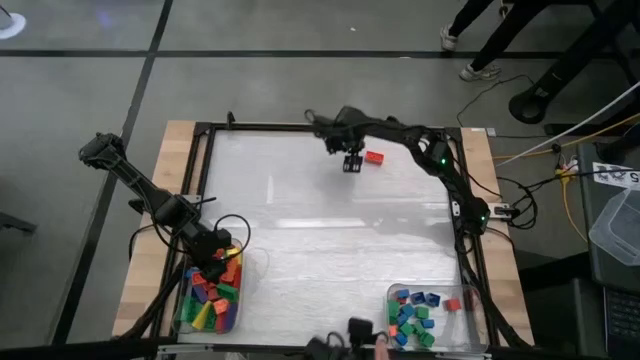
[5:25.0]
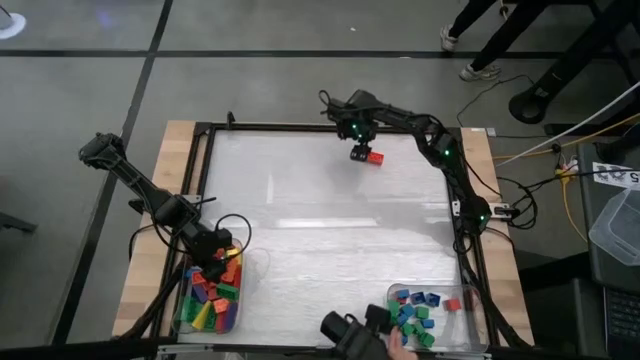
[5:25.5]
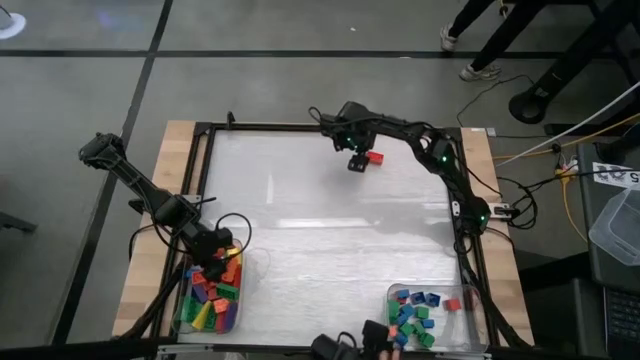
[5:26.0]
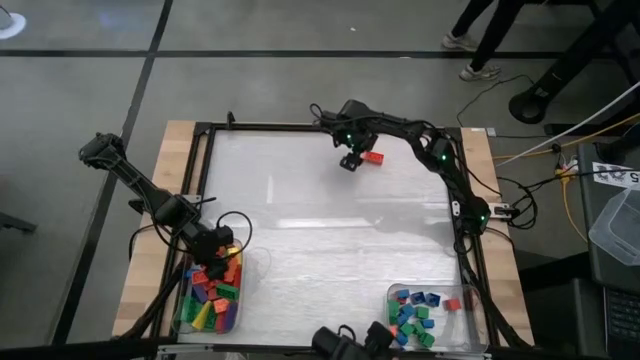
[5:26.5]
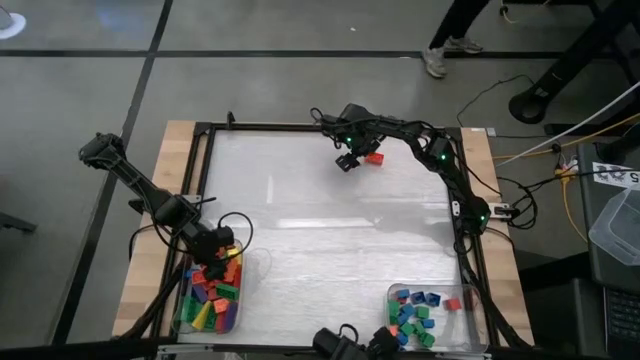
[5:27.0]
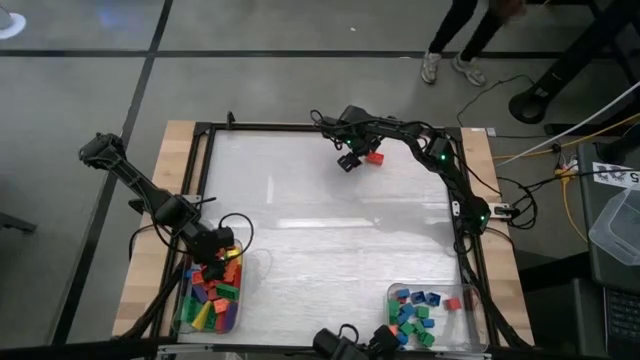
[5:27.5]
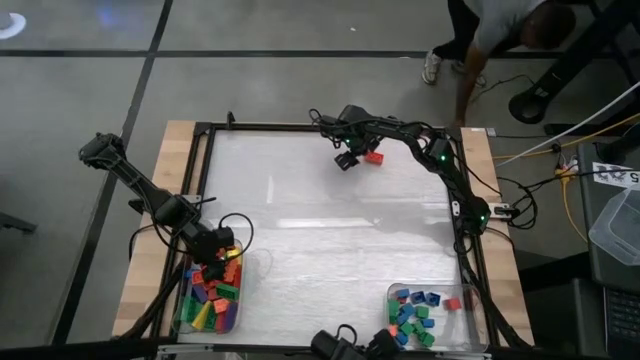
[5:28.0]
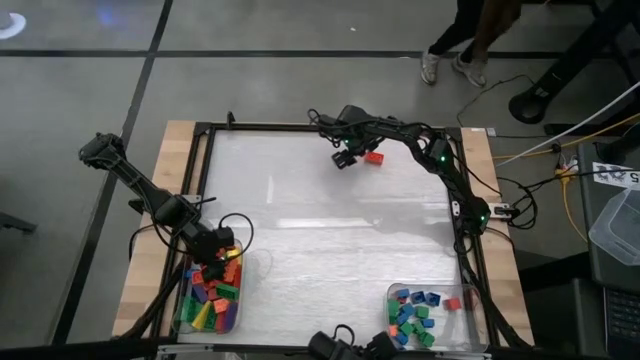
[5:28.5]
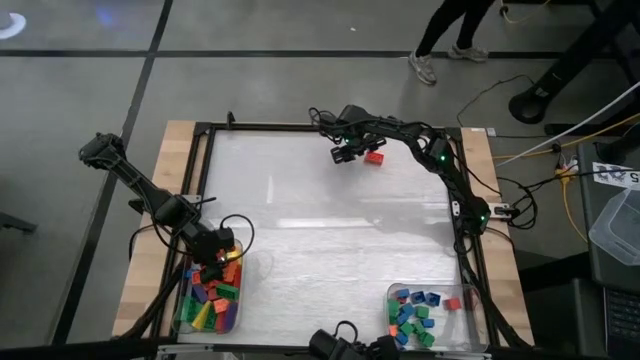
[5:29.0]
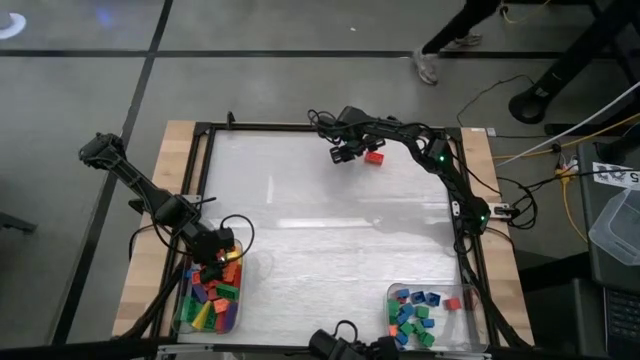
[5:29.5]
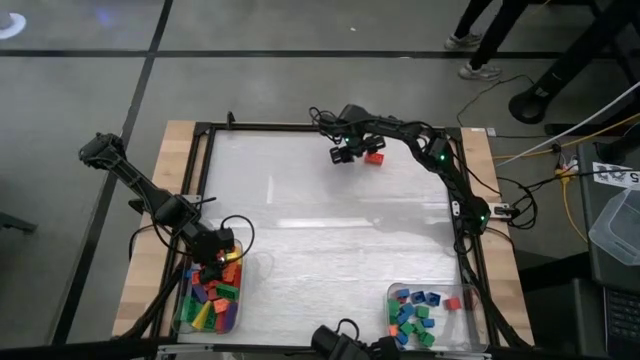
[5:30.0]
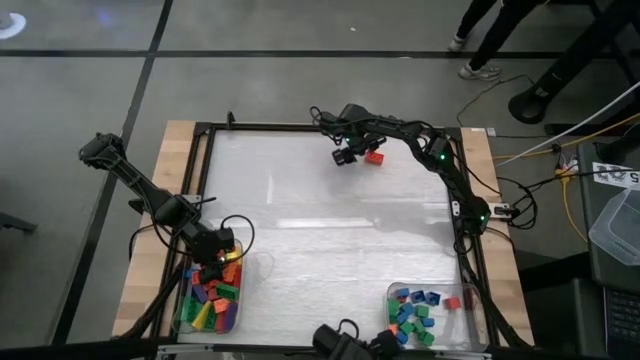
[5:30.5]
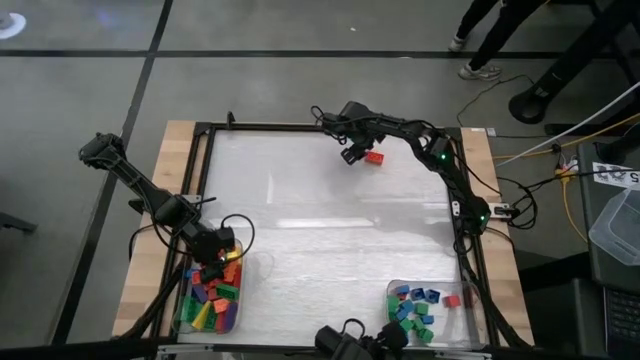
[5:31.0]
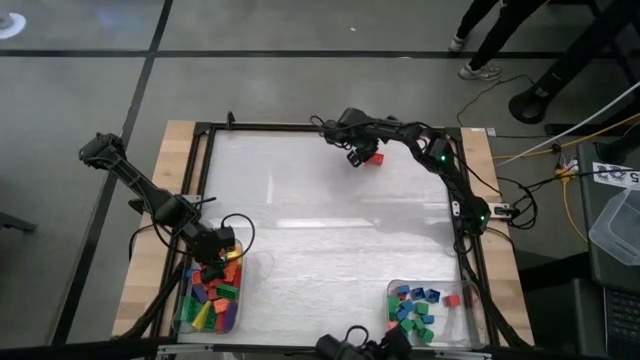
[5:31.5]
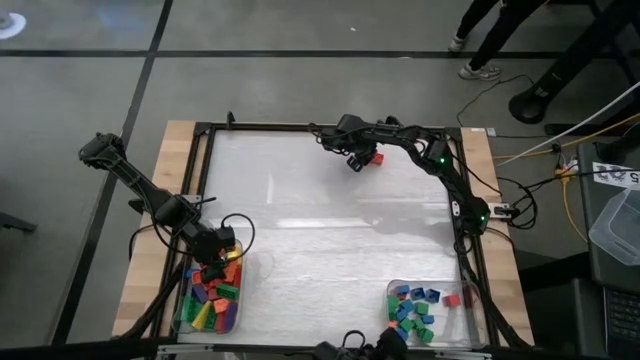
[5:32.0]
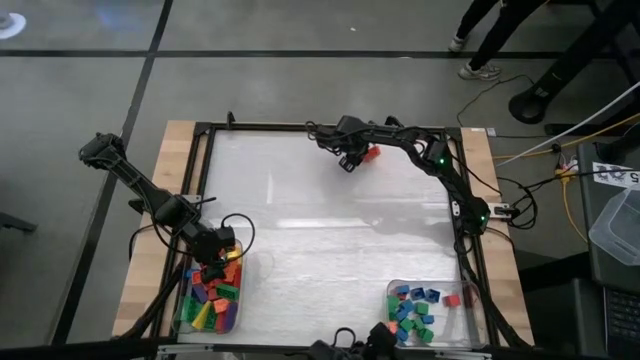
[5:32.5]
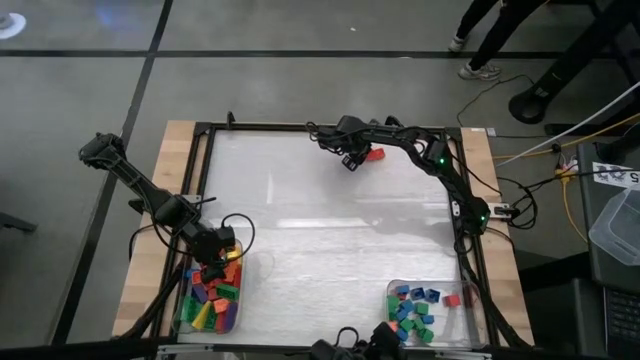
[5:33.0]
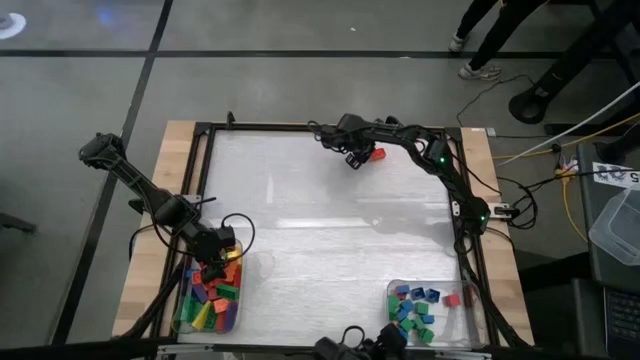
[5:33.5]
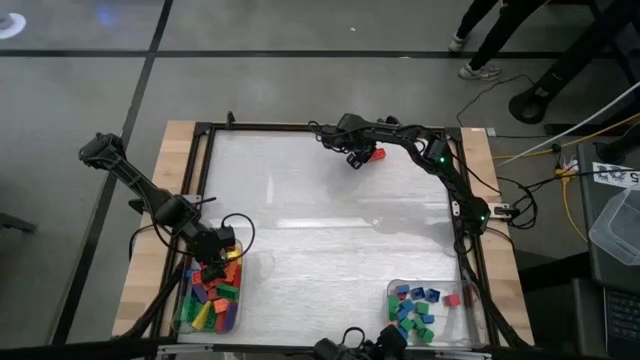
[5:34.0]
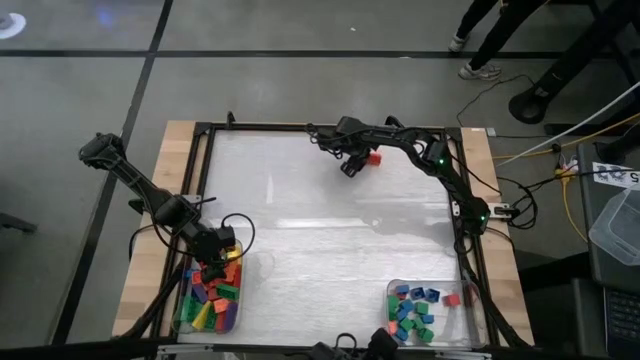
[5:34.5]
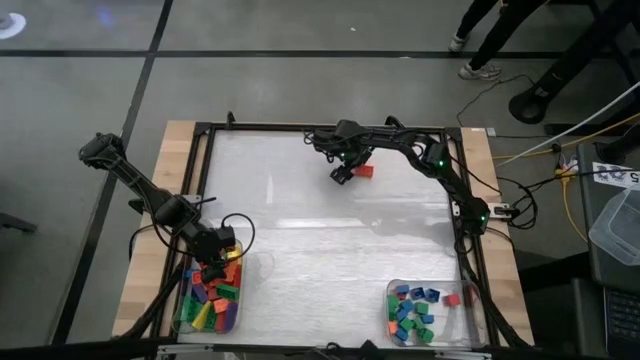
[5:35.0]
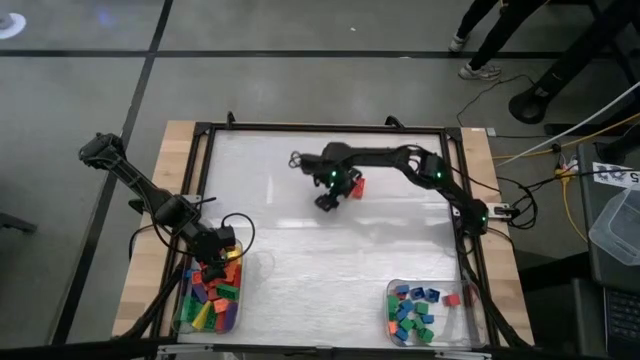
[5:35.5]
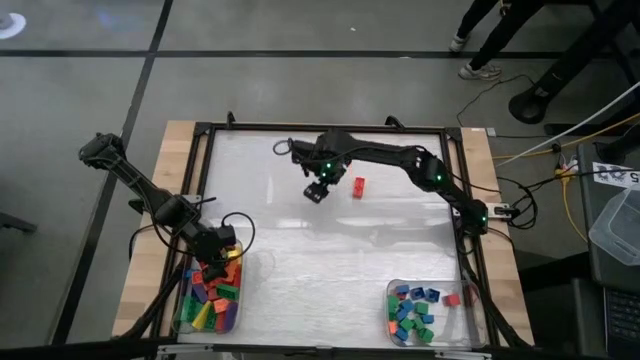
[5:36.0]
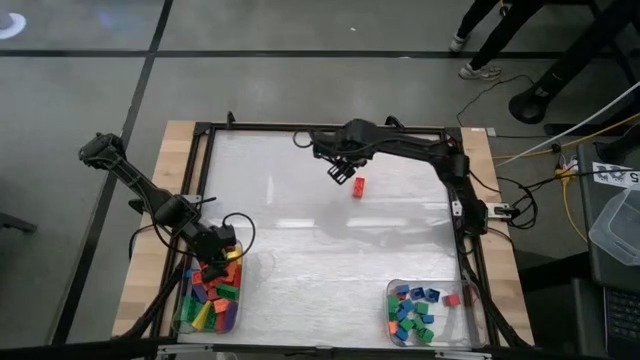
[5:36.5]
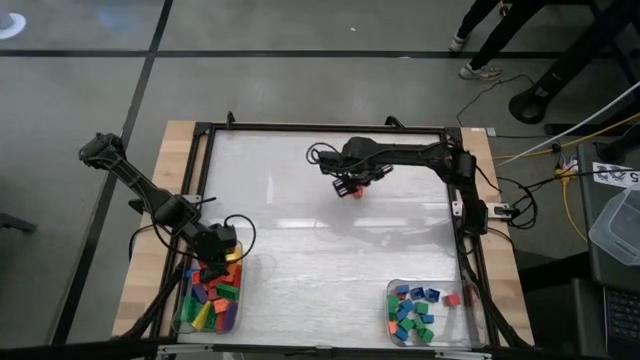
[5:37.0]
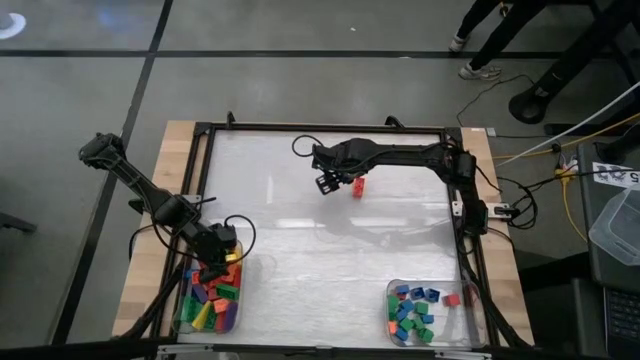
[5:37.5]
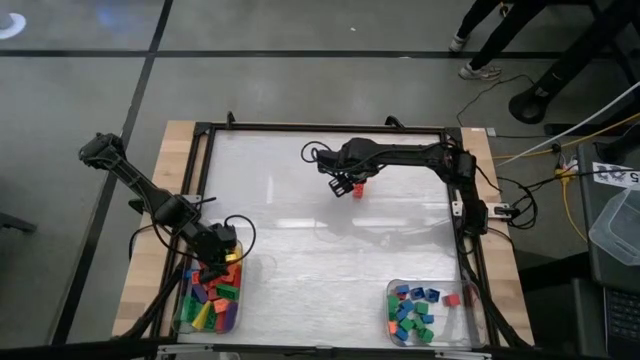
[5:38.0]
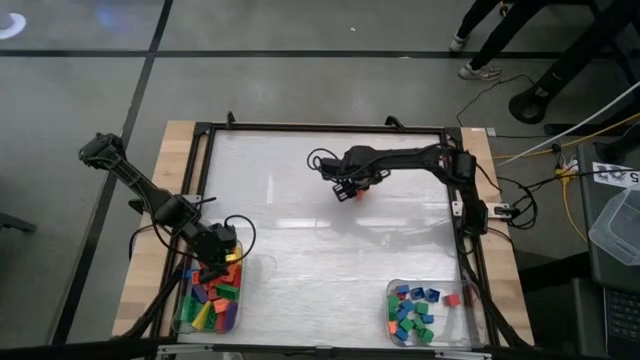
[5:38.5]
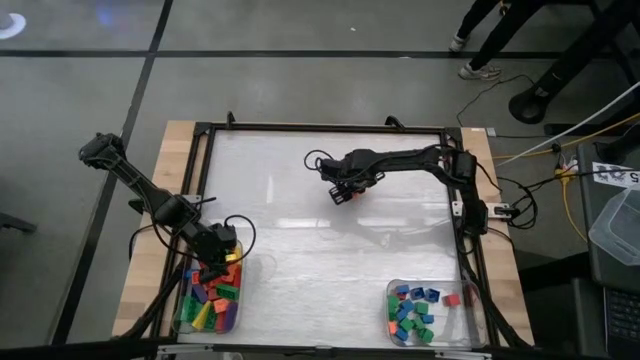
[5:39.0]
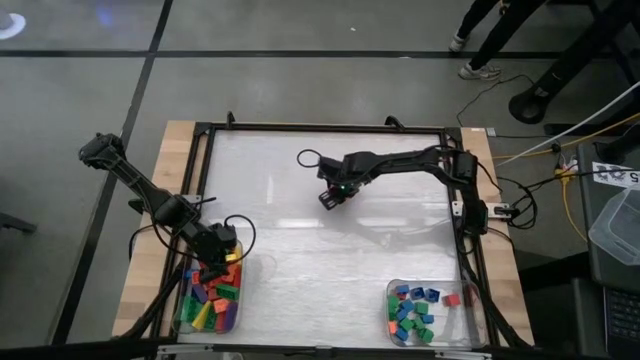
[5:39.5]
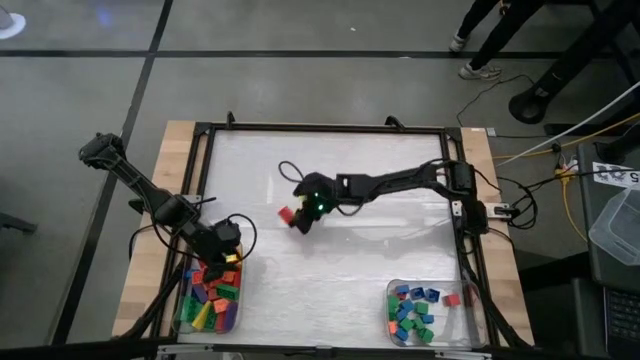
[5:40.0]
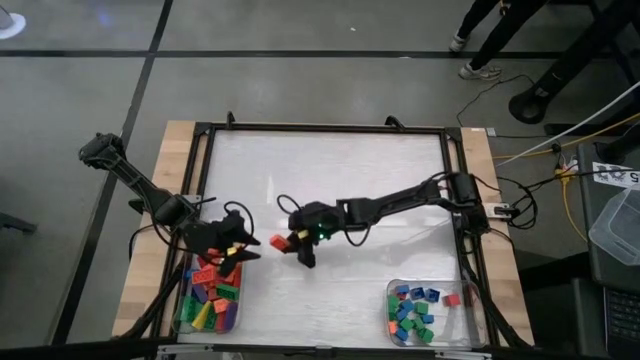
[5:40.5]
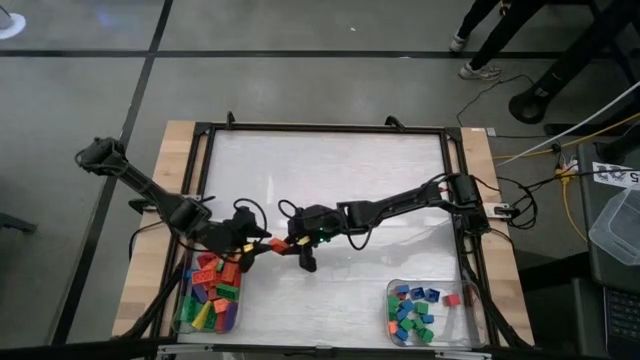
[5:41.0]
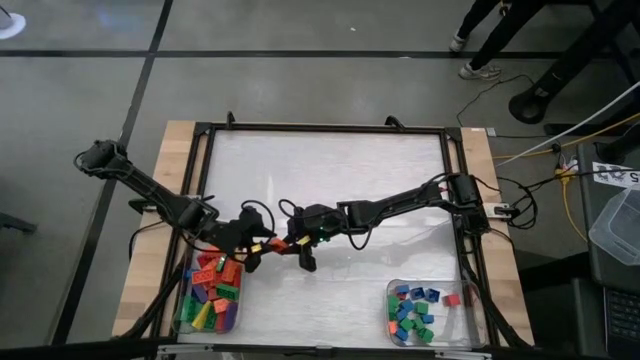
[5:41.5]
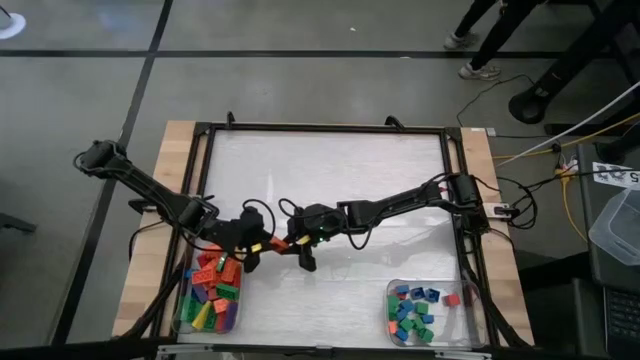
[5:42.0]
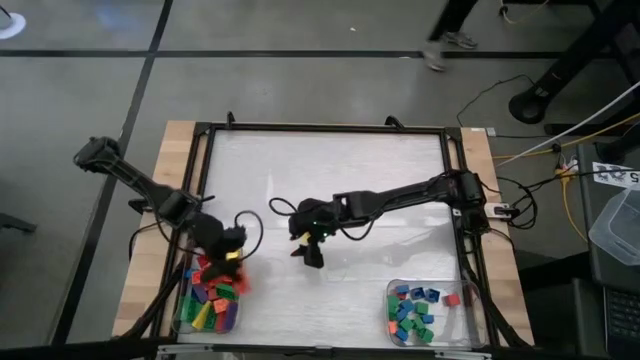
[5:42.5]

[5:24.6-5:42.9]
Task: Sort blocks by size
Put the large orange game piece into the left transparent bin

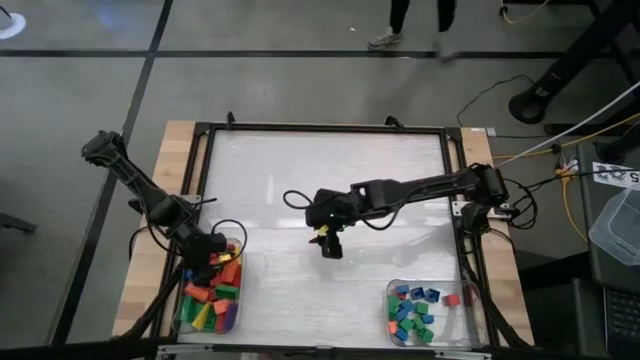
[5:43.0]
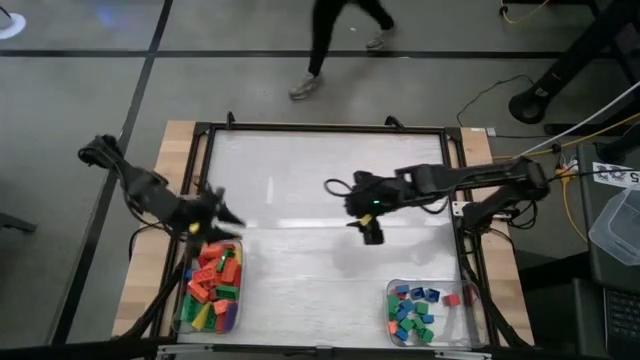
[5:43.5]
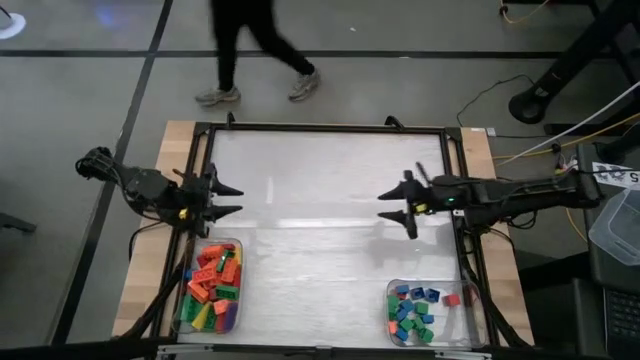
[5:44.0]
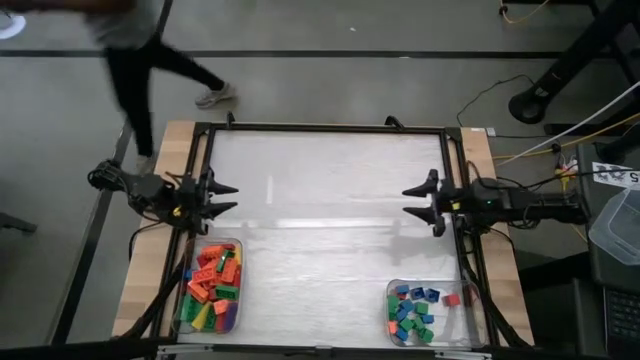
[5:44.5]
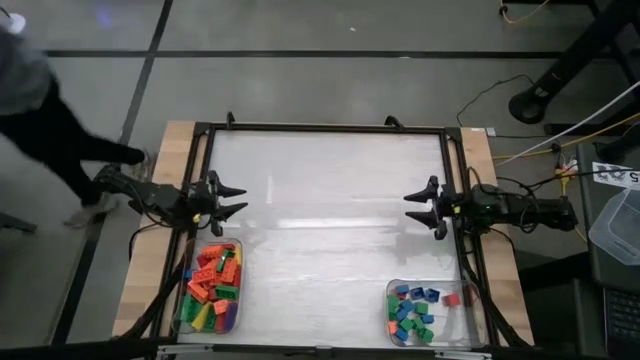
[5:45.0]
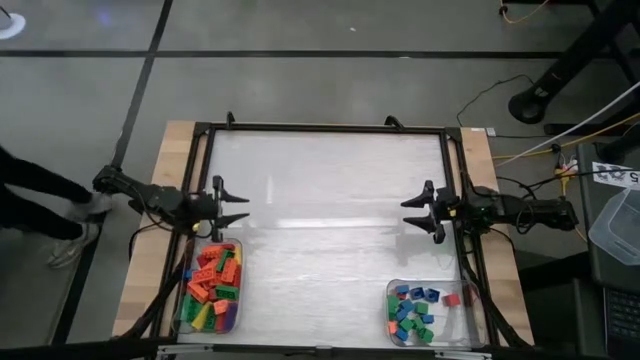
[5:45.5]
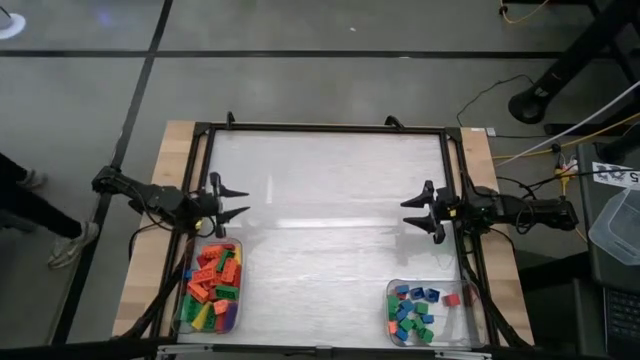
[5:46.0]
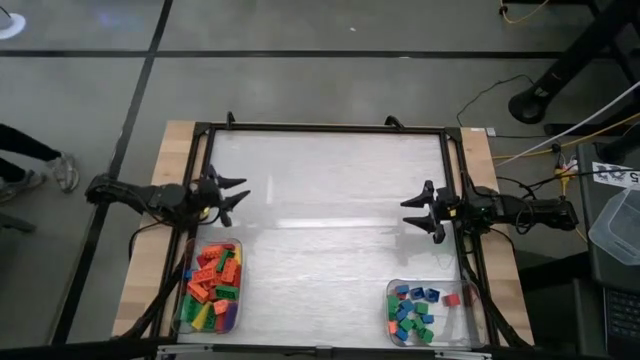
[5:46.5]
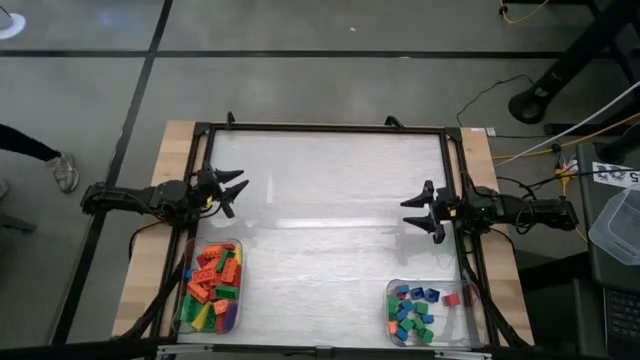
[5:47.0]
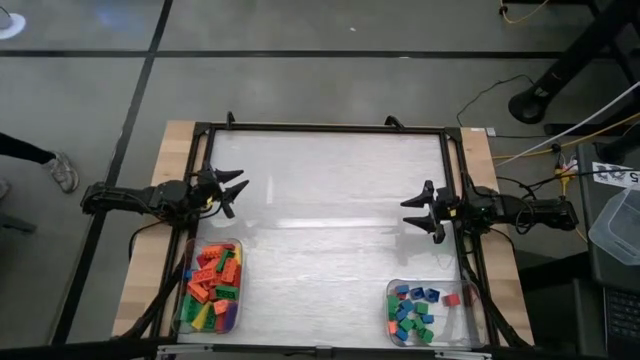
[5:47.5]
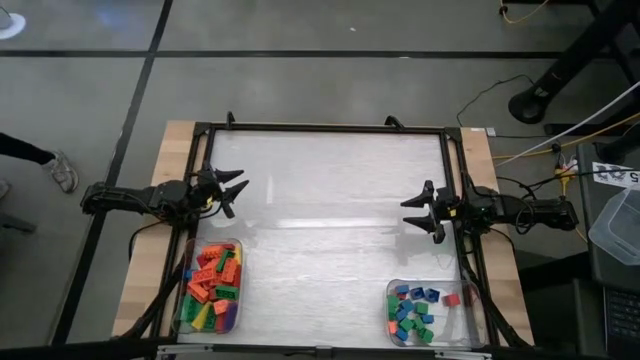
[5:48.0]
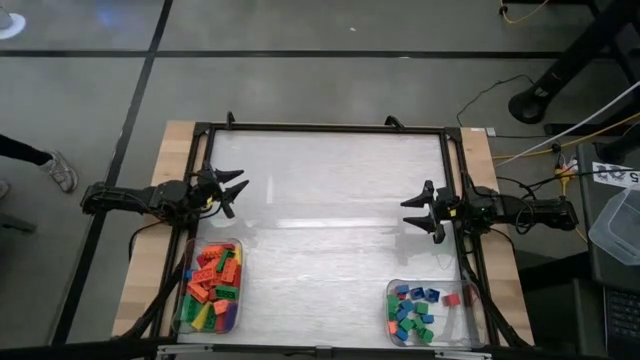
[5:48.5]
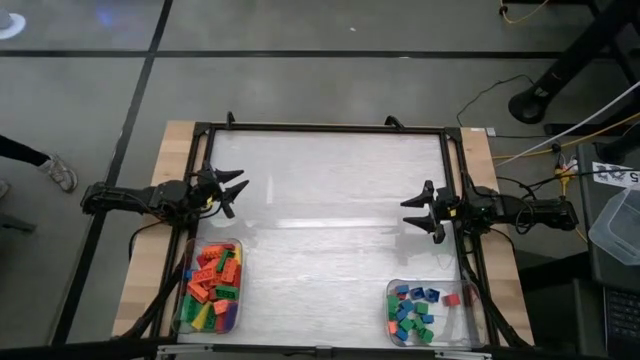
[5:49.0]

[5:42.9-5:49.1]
Return to Home Position
